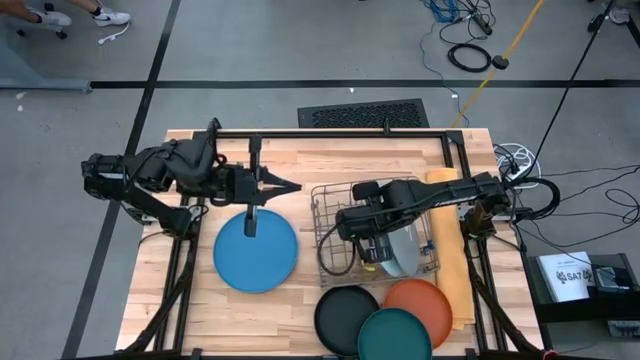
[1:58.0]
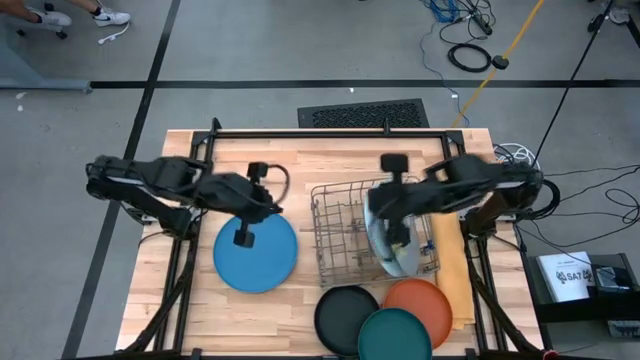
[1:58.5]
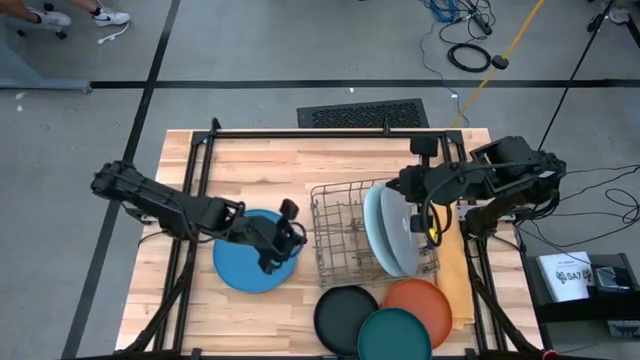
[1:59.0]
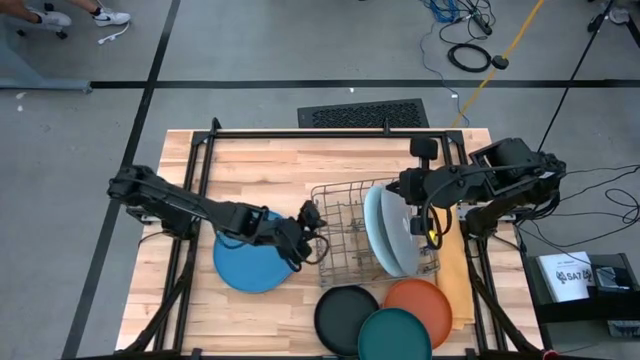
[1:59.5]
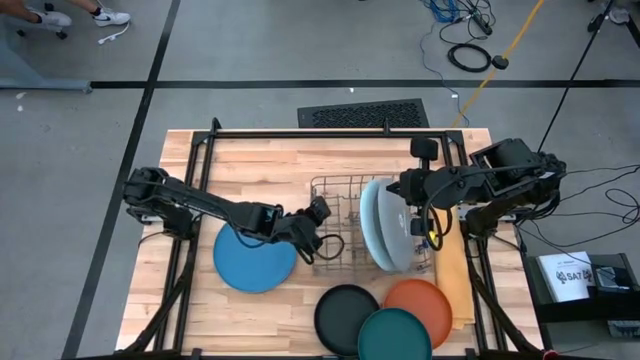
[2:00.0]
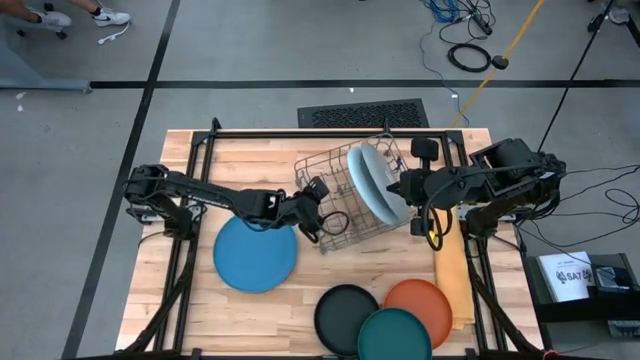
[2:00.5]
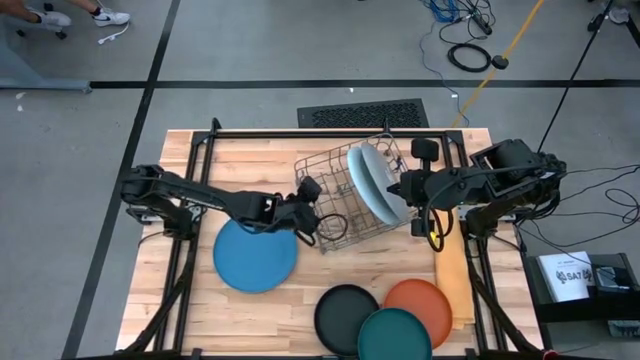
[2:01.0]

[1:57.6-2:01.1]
Task: Sort dishes
Adjust the dish rack

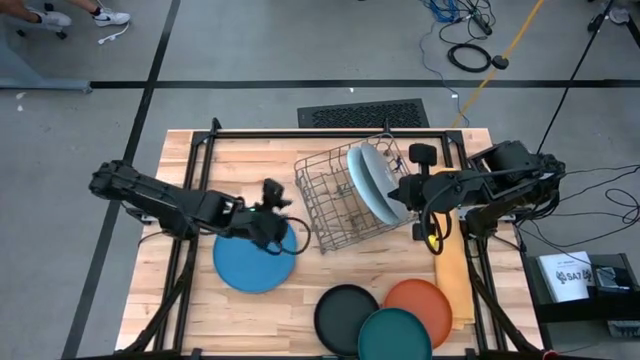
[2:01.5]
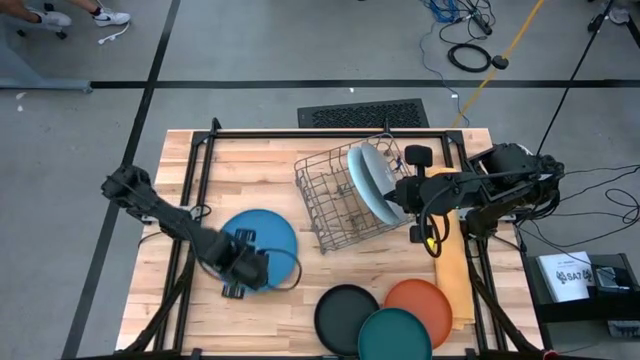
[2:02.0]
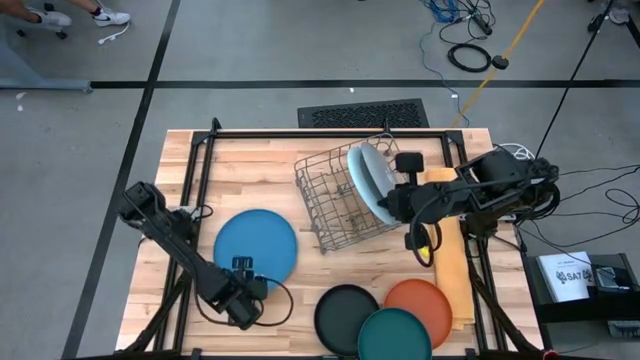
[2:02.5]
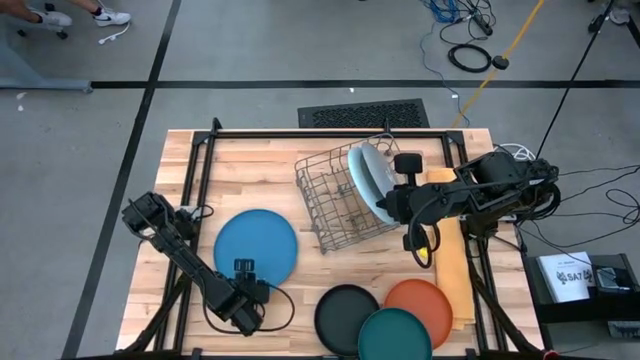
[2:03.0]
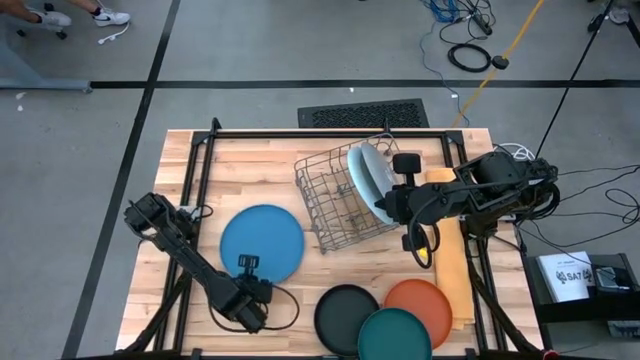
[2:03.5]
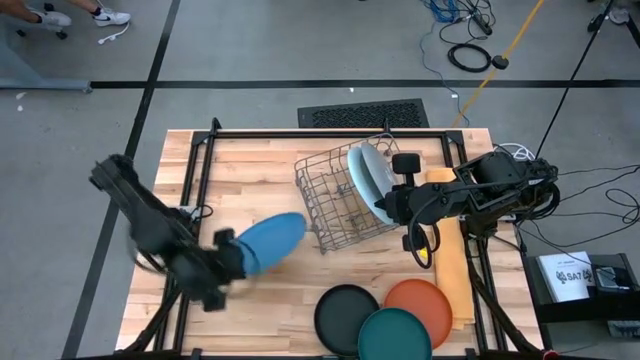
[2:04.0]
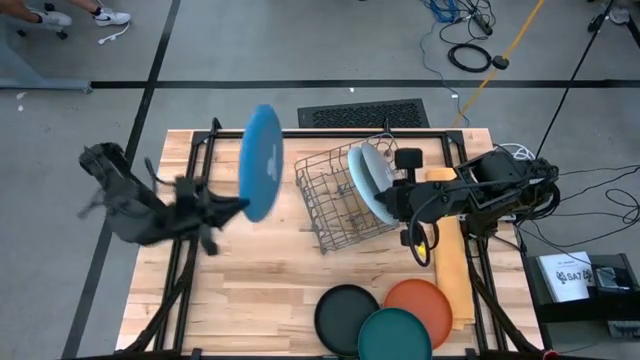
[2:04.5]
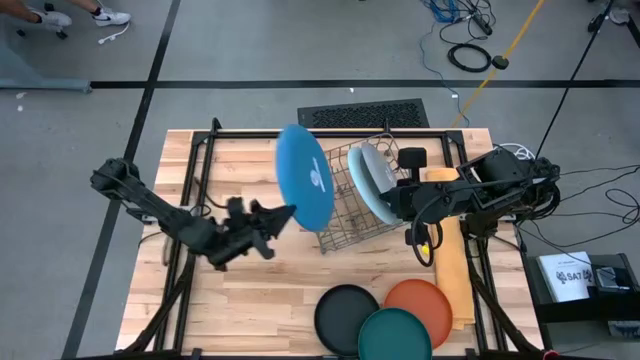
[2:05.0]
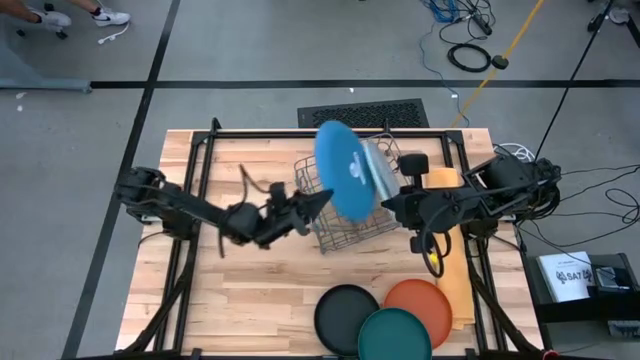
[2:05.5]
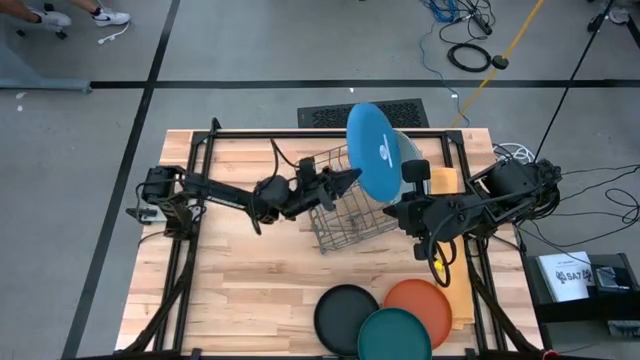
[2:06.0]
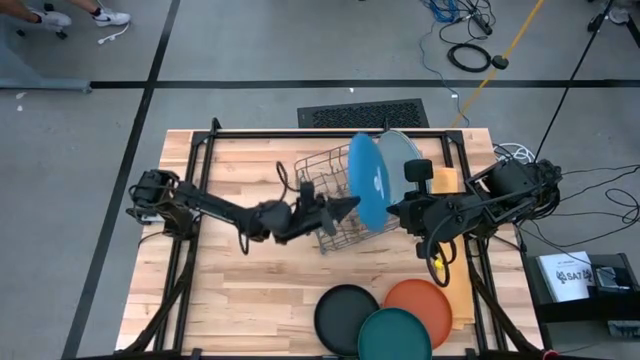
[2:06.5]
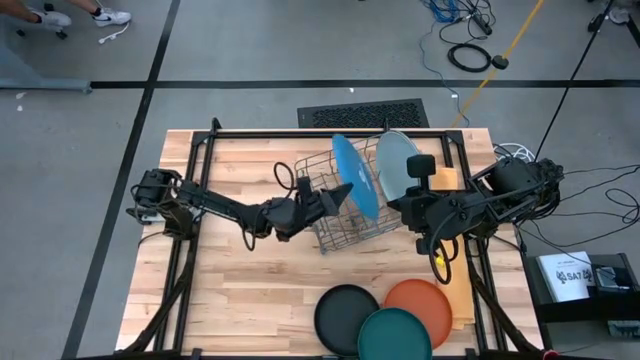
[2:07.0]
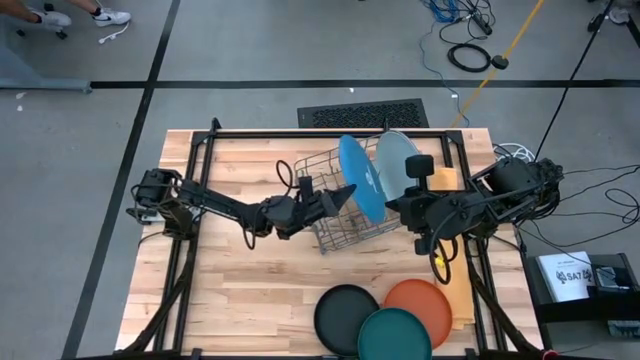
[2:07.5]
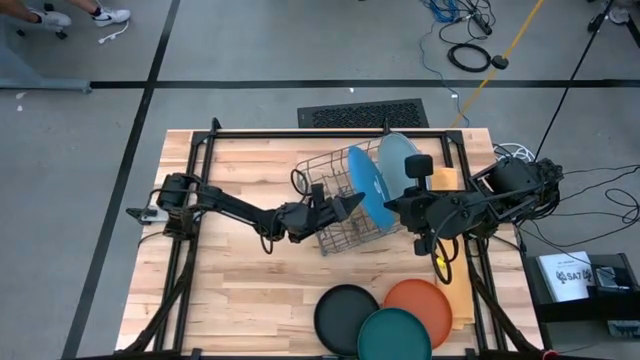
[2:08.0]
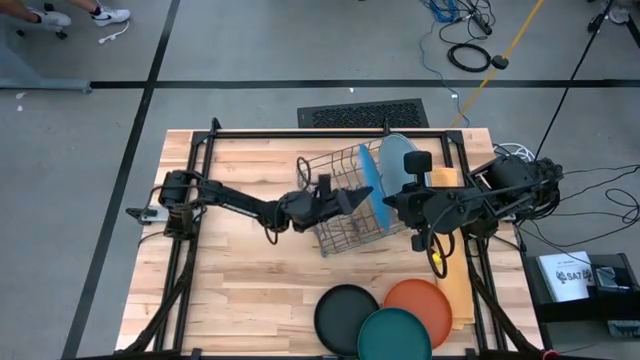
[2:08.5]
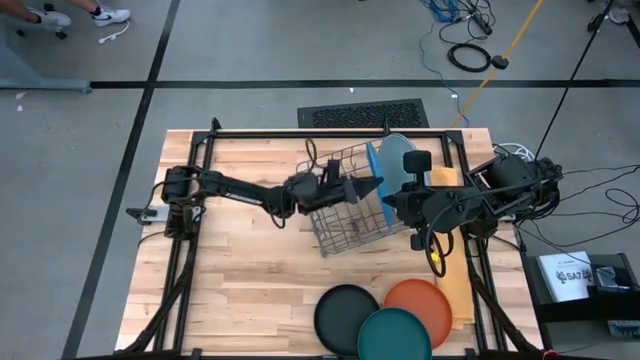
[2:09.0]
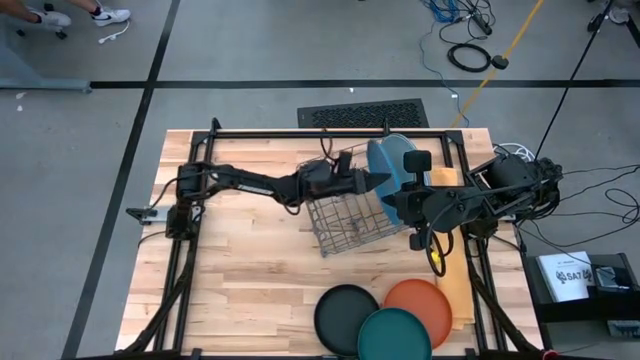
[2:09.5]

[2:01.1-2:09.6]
Put the blue plate into the dish rack
